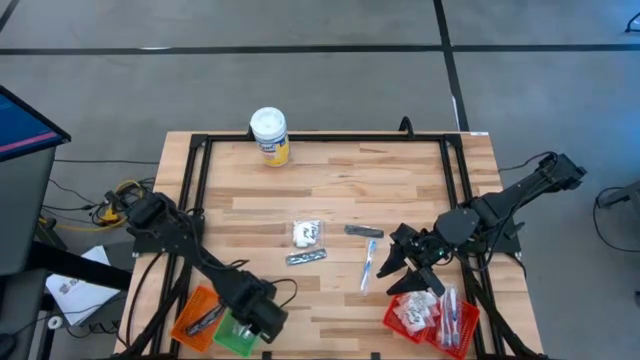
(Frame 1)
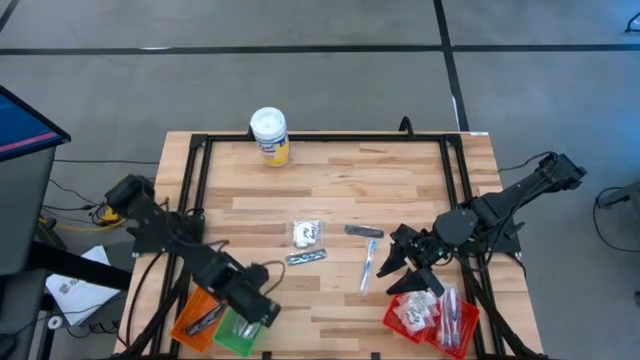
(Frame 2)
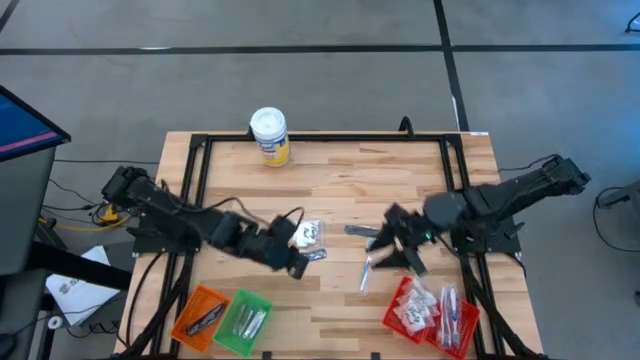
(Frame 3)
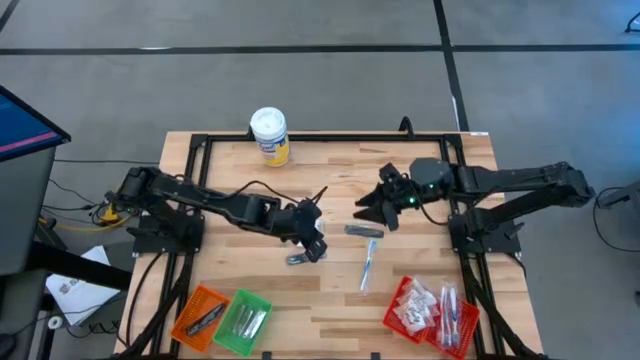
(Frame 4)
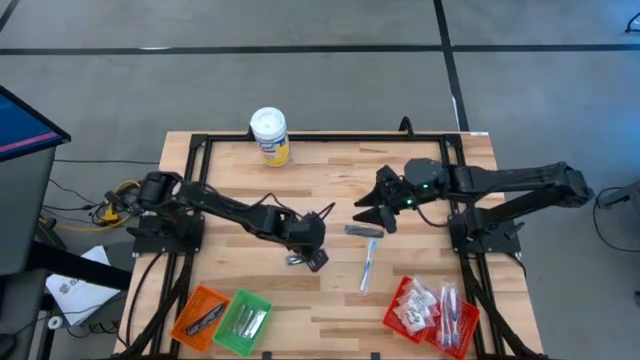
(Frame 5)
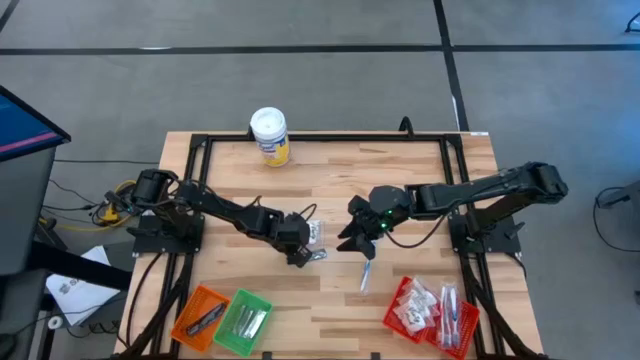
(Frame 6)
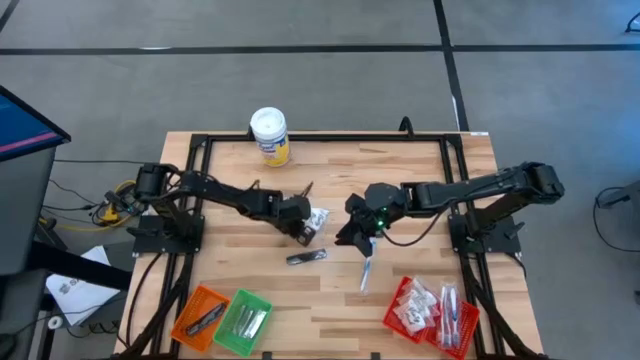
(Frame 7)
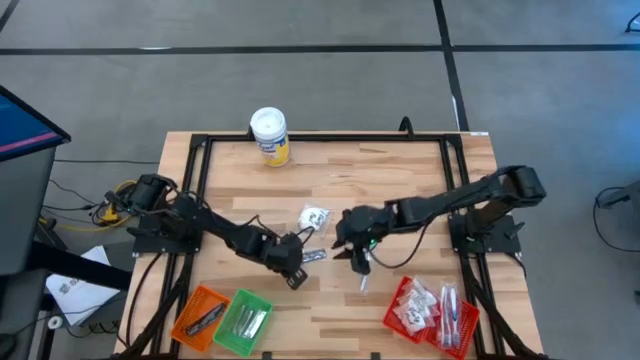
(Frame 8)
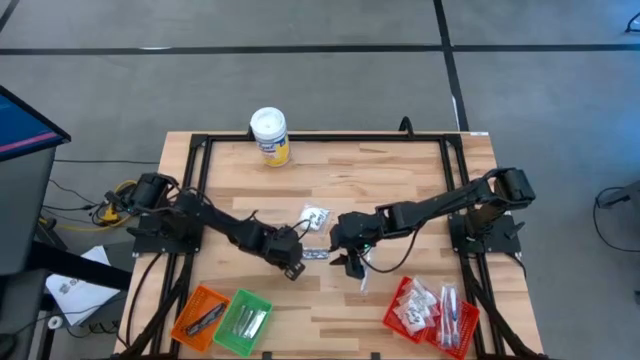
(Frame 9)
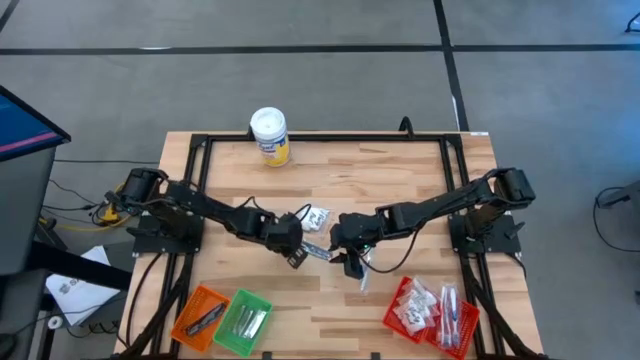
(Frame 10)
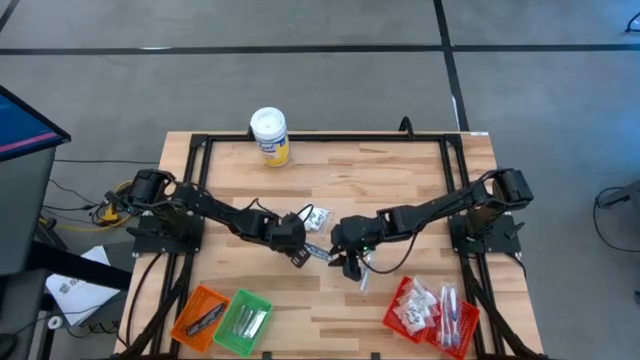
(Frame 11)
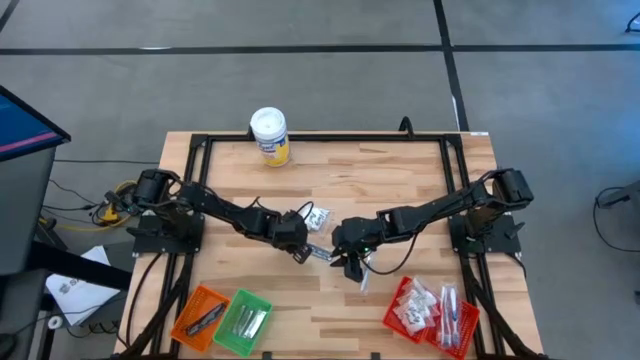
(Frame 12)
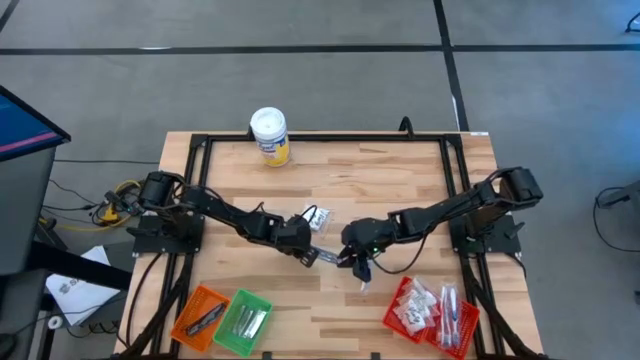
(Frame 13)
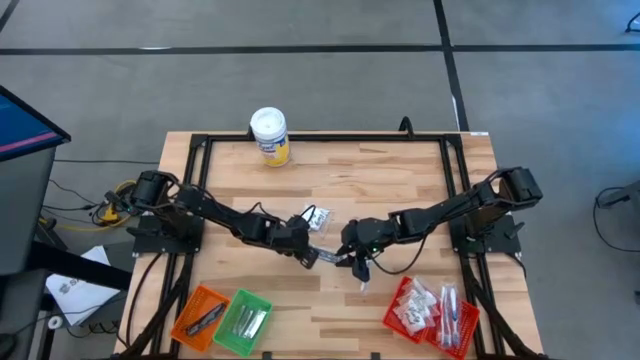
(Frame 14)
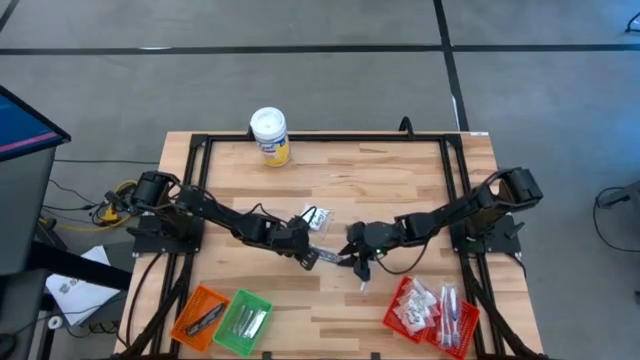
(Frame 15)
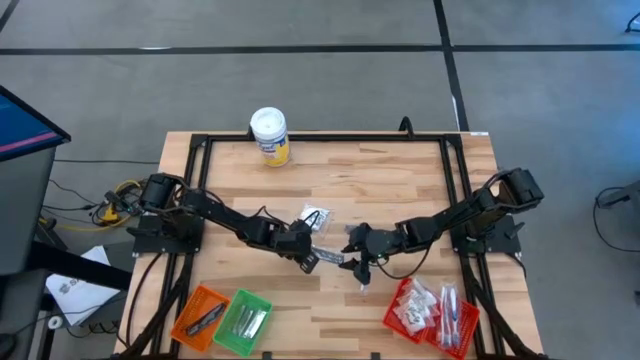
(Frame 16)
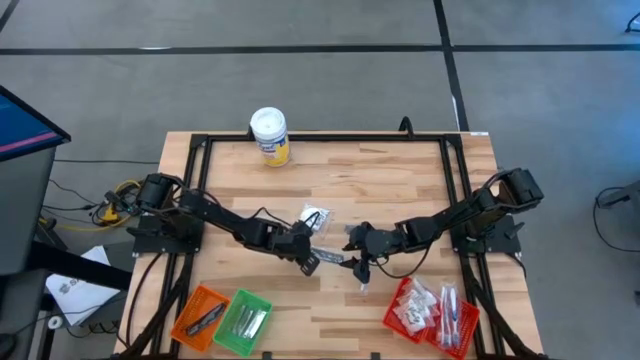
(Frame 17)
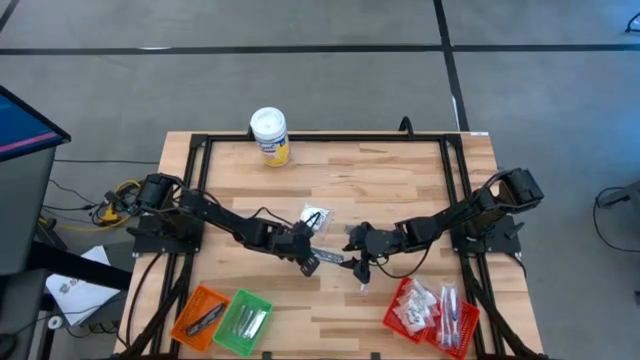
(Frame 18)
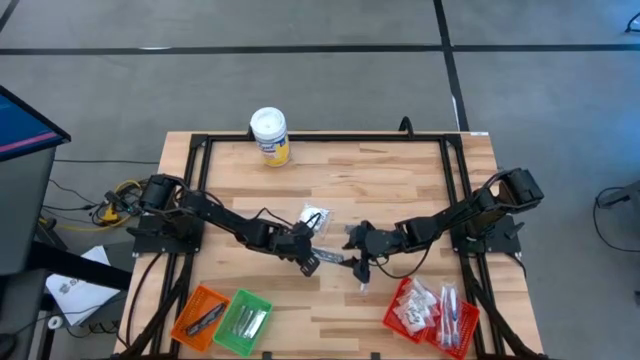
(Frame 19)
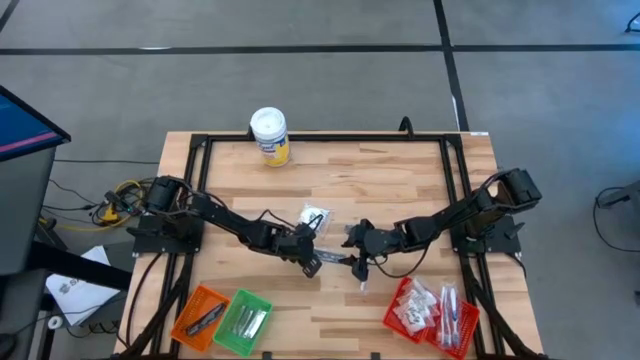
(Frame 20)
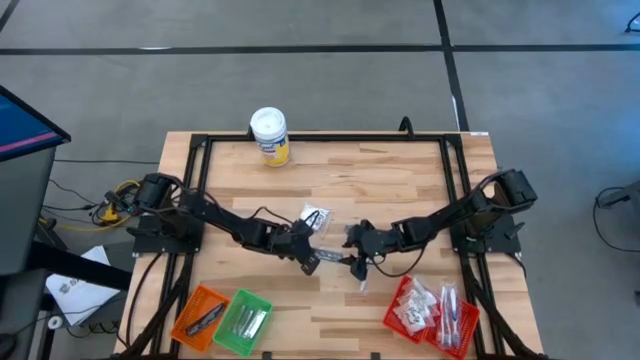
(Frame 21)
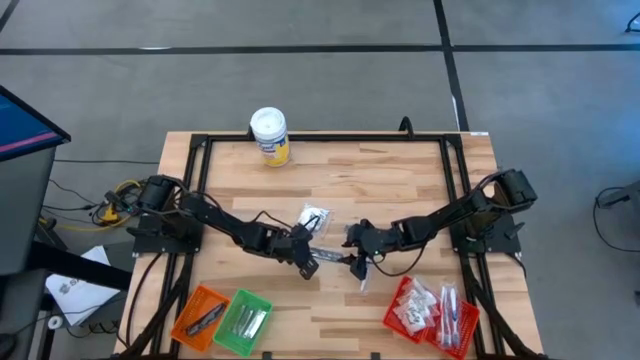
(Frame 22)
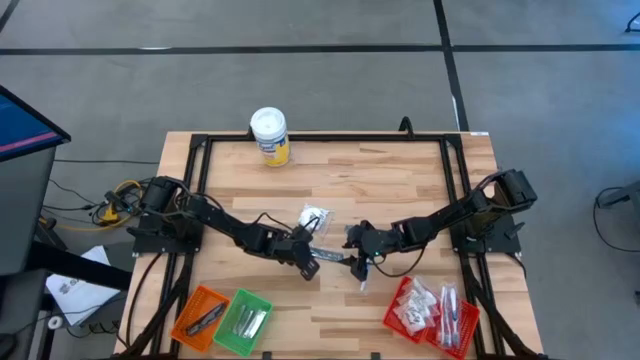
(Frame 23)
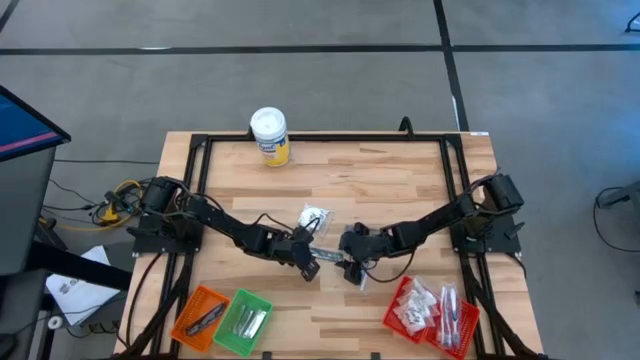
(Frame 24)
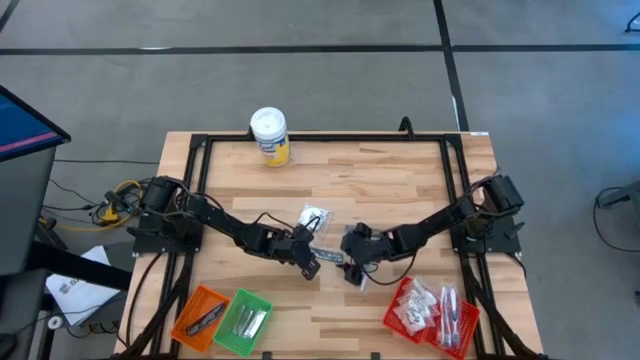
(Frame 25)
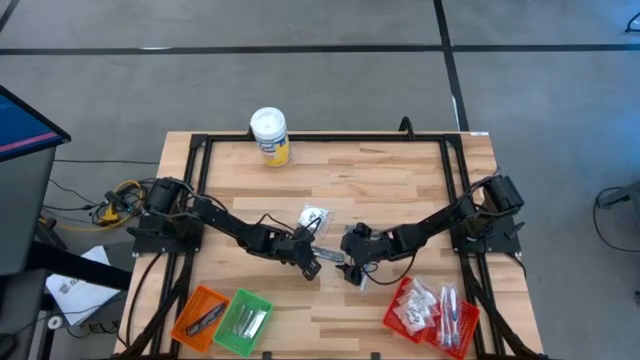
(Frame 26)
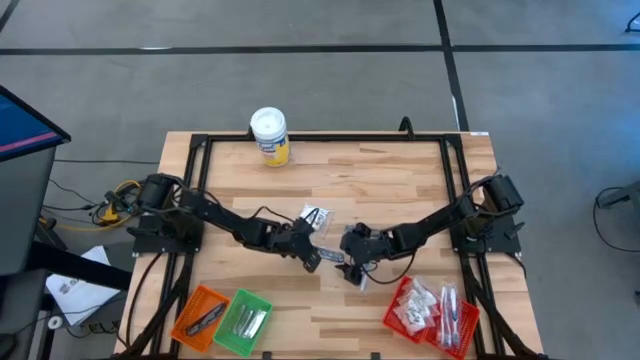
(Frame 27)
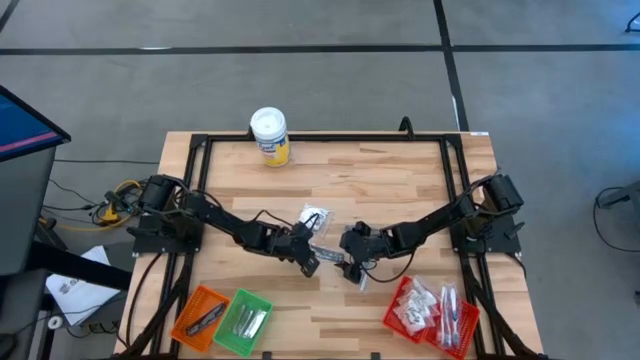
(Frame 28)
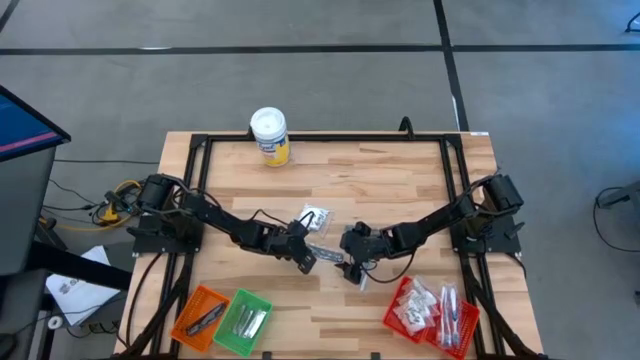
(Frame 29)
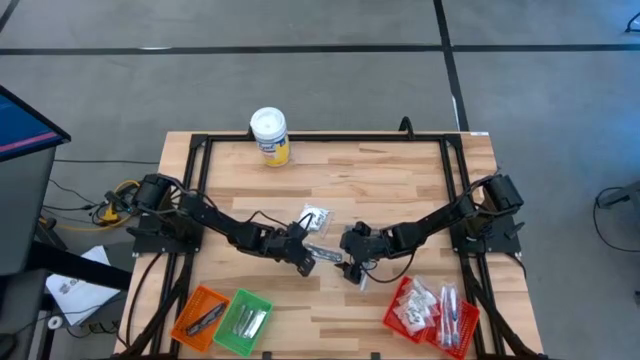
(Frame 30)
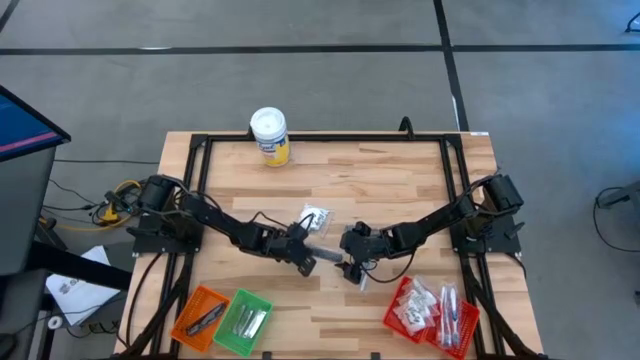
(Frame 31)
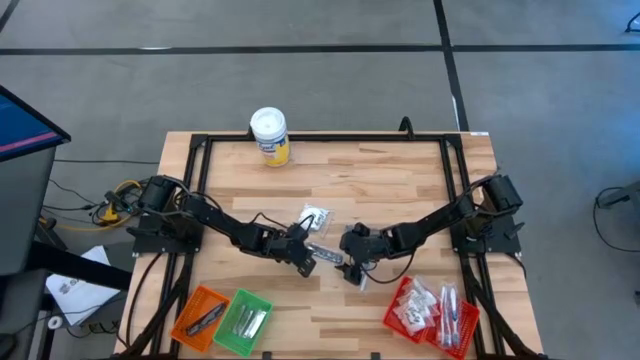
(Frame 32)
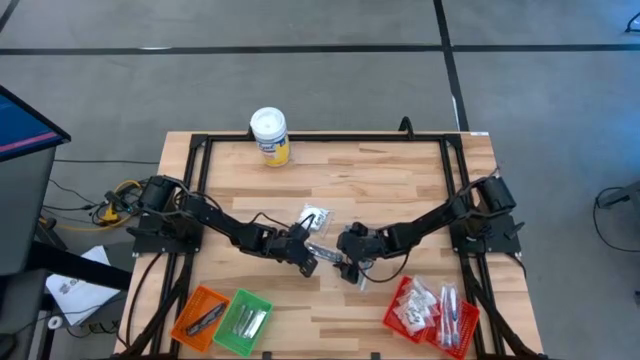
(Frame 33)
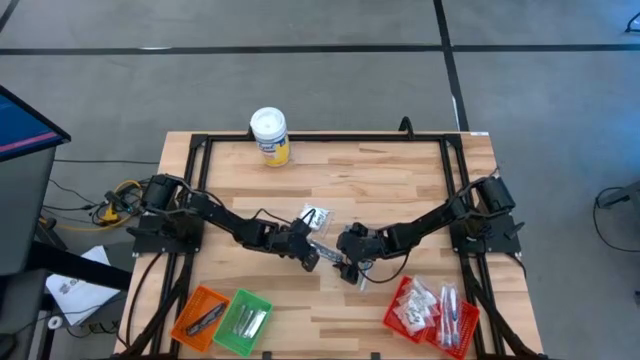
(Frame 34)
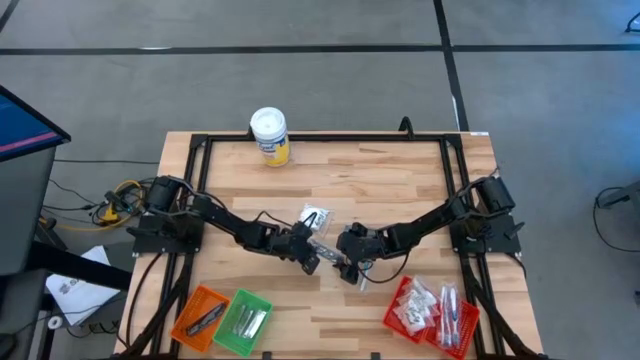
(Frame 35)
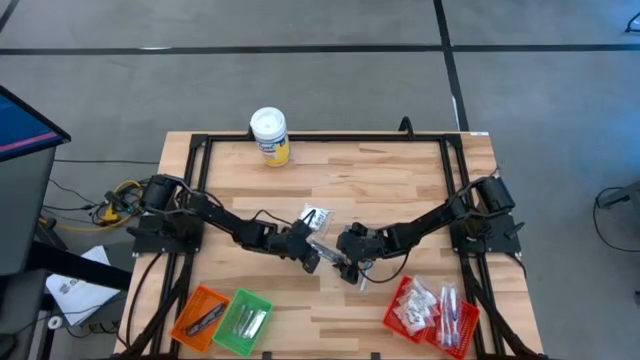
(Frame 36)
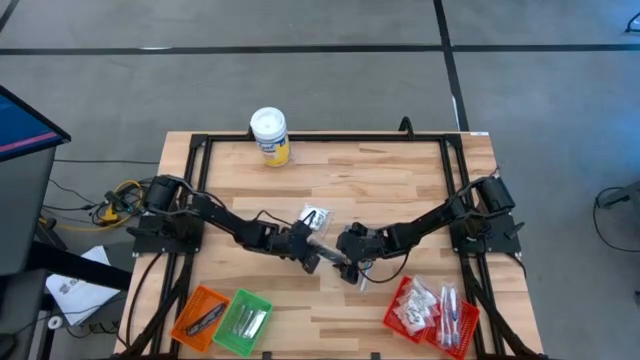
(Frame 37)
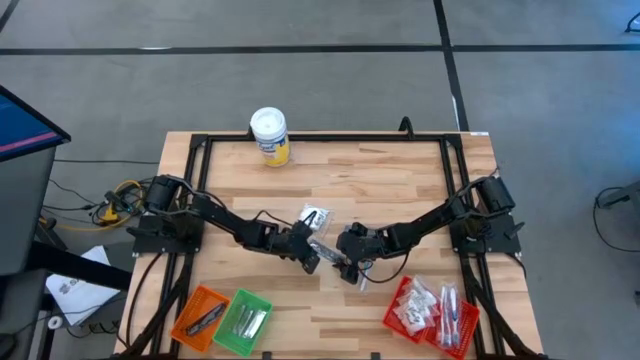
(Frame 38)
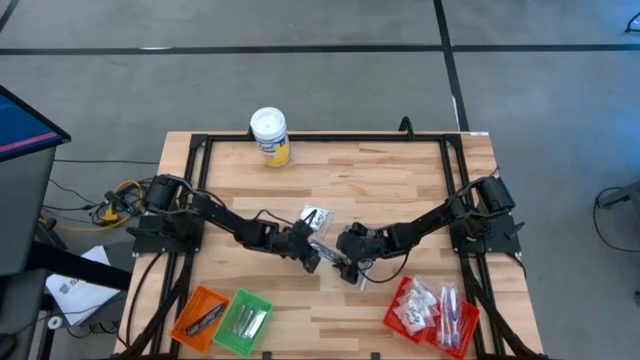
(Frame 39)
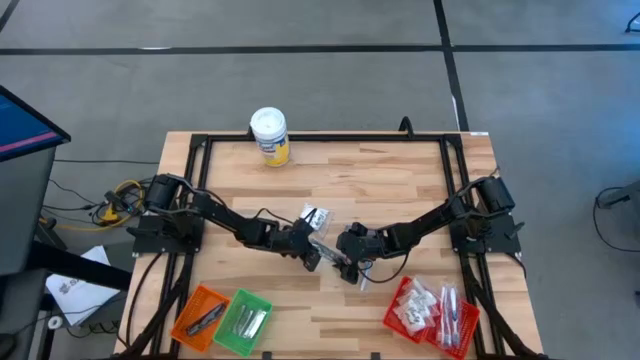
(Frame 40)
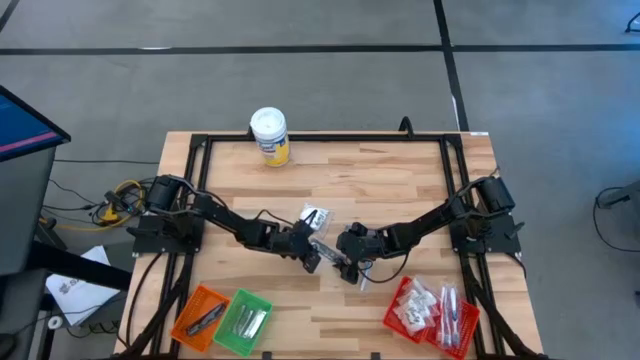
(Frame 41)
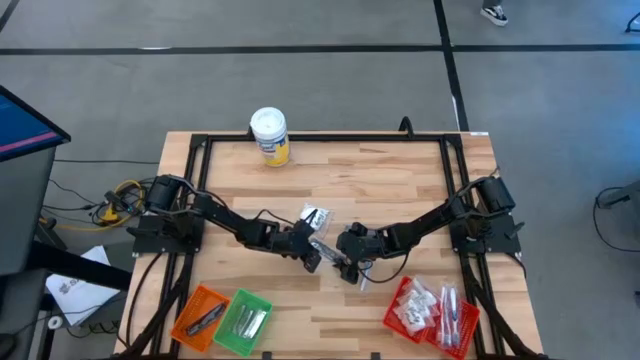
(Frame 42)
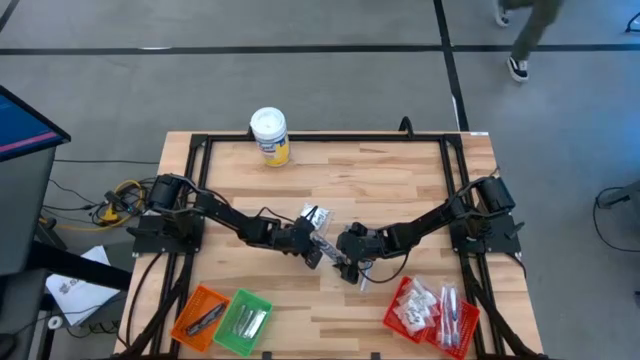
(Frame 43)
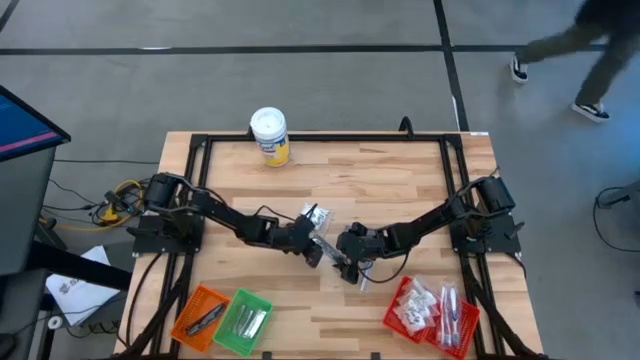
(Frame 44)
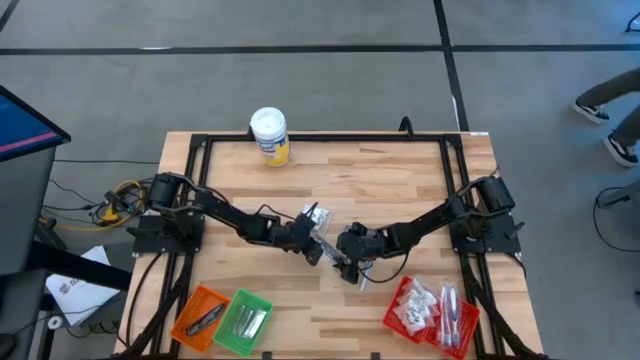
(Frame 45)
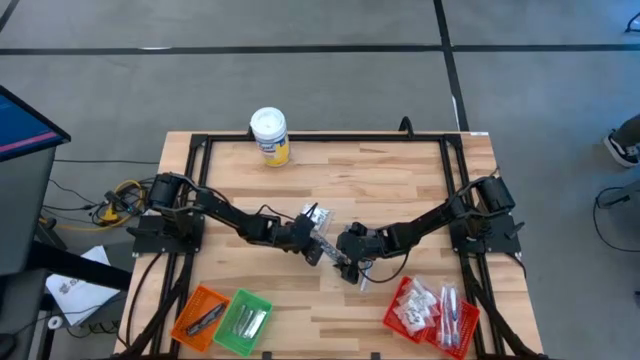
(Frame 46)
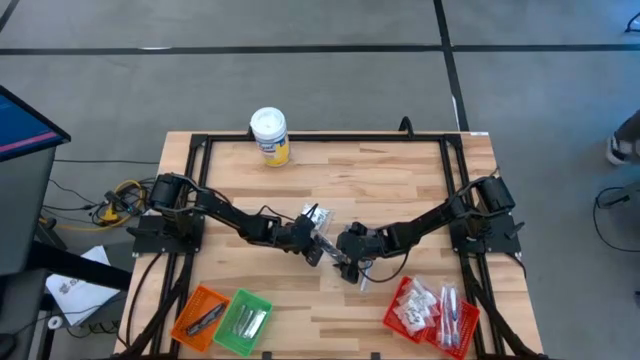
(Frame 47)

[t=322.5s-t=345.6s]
Task: Pick & Place Travel size toiletries
Put the black comb into the orange basket
